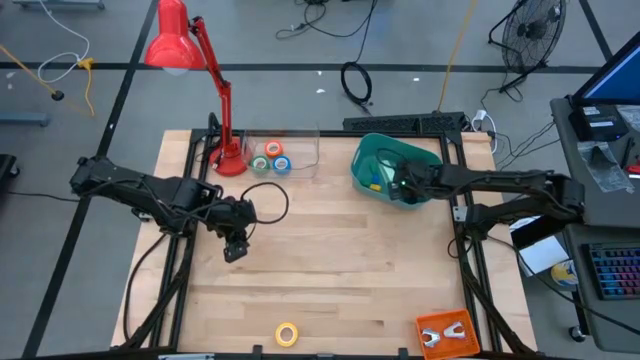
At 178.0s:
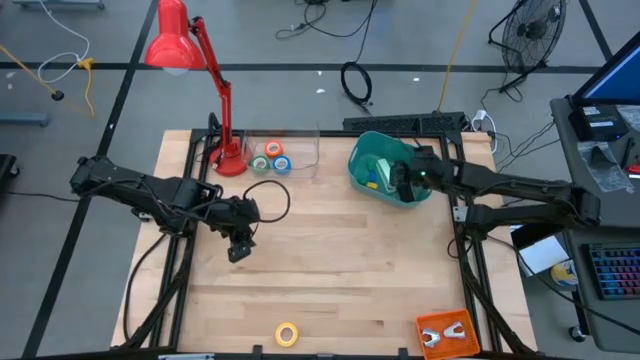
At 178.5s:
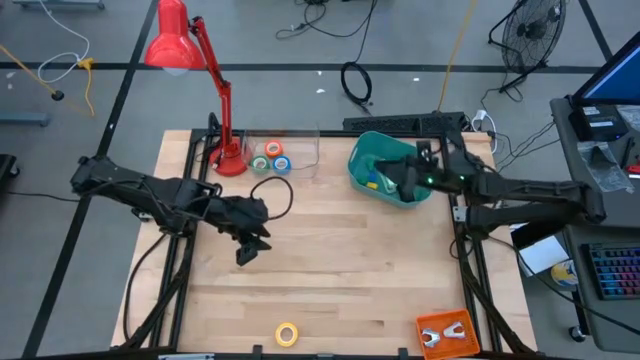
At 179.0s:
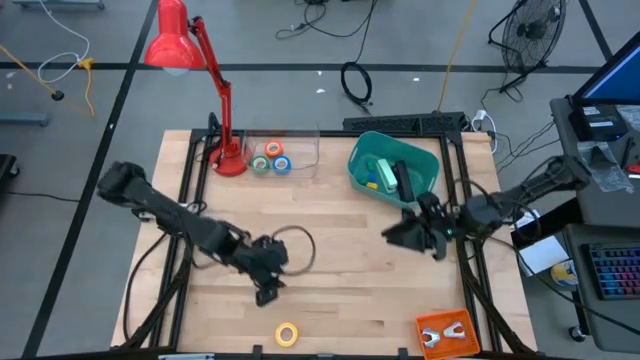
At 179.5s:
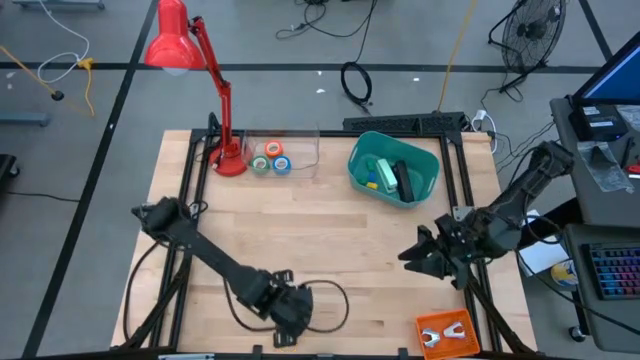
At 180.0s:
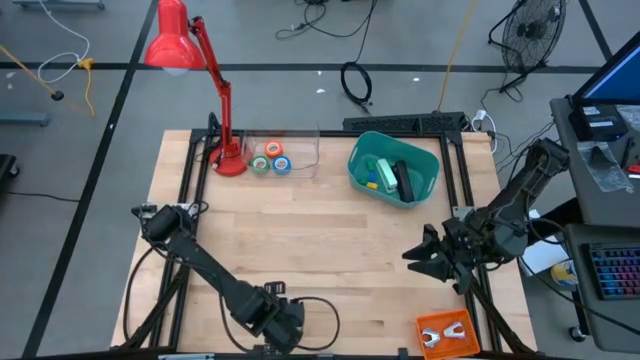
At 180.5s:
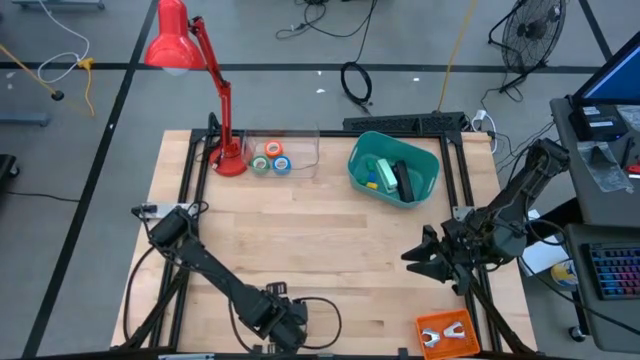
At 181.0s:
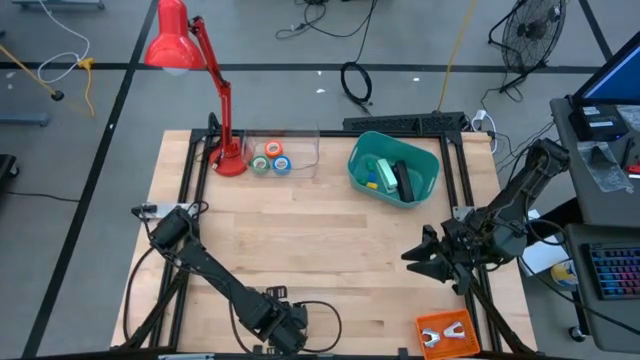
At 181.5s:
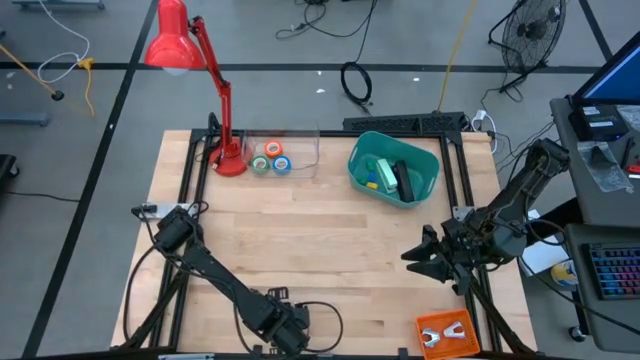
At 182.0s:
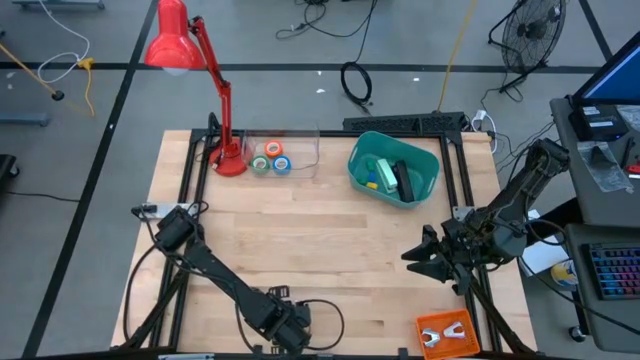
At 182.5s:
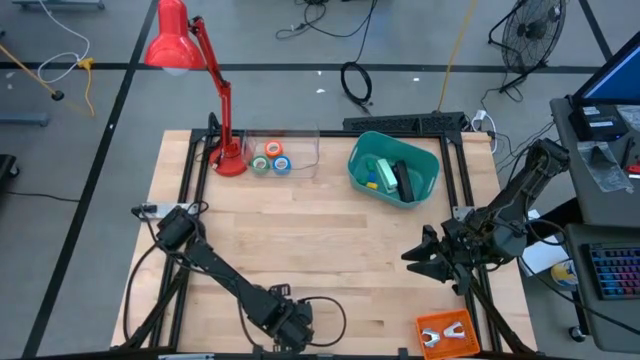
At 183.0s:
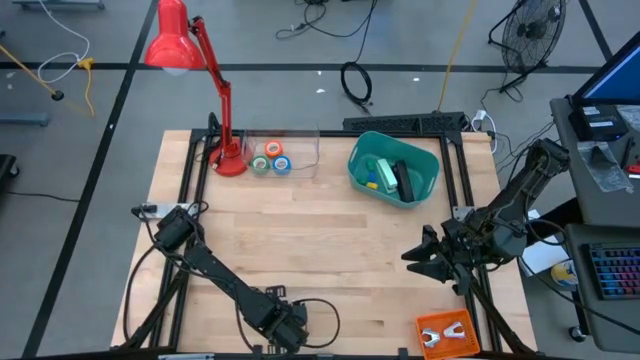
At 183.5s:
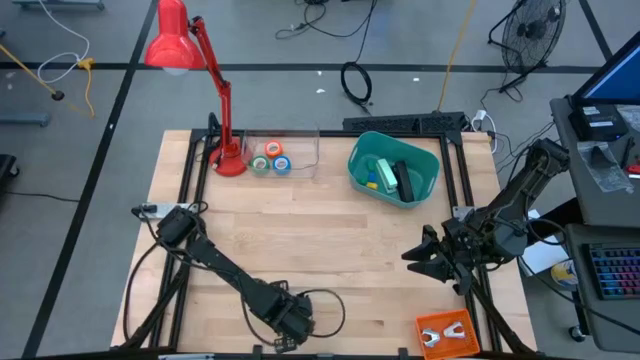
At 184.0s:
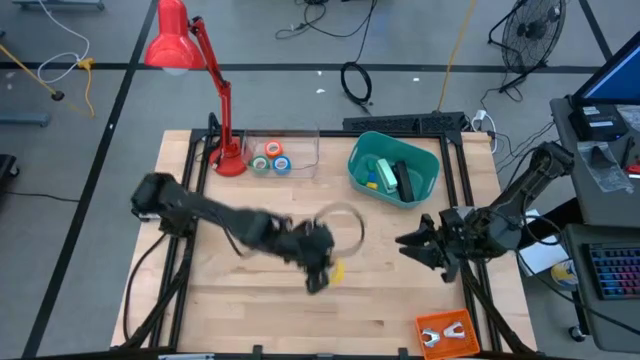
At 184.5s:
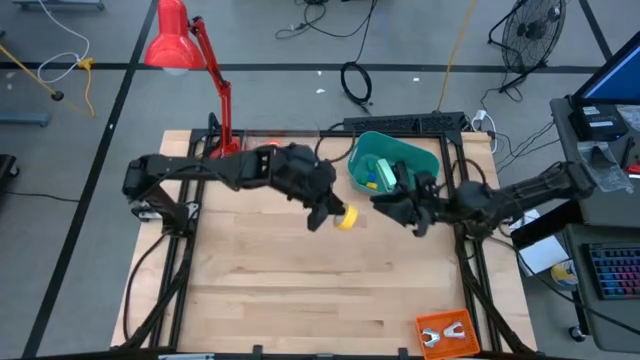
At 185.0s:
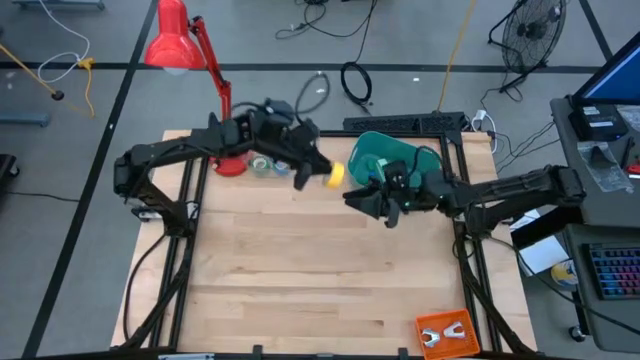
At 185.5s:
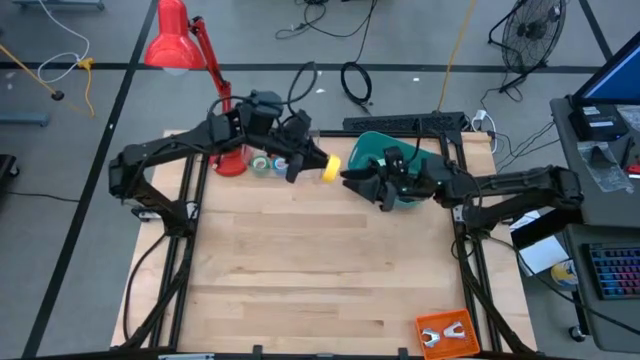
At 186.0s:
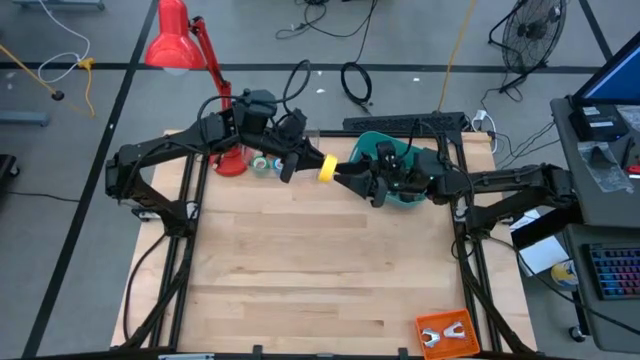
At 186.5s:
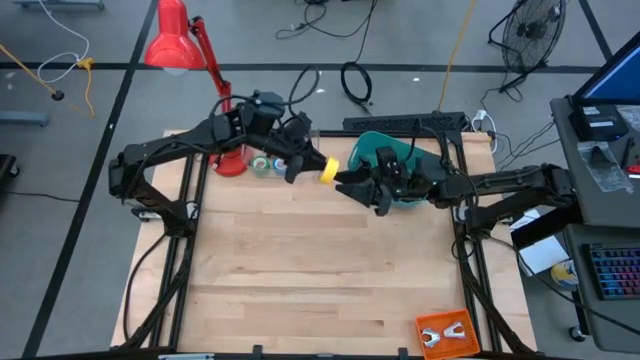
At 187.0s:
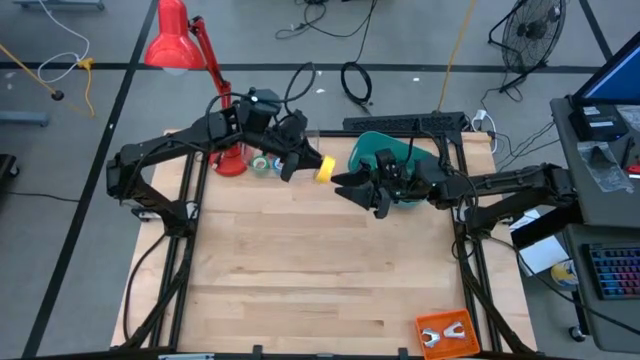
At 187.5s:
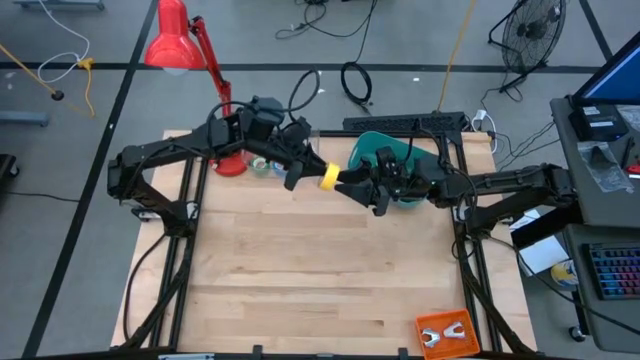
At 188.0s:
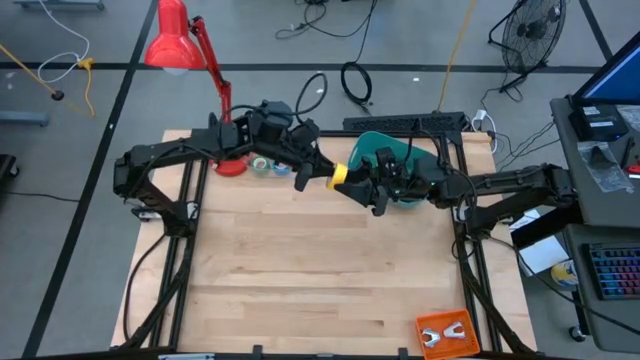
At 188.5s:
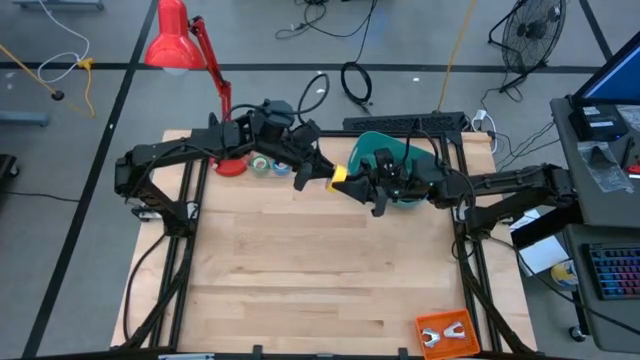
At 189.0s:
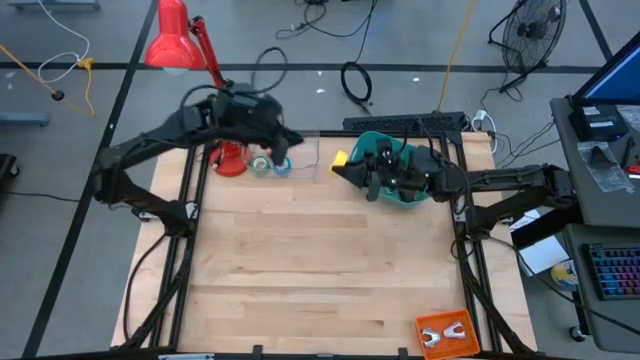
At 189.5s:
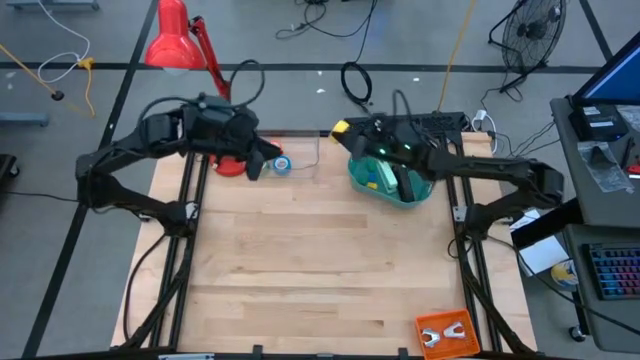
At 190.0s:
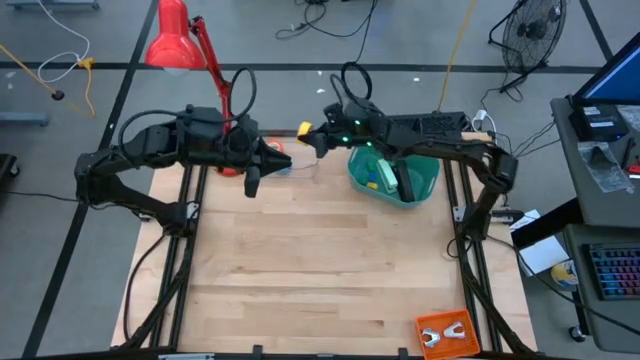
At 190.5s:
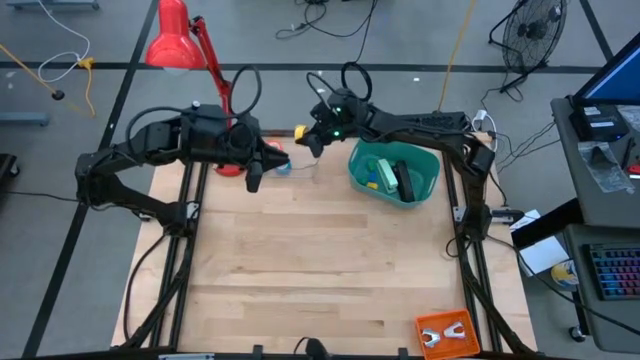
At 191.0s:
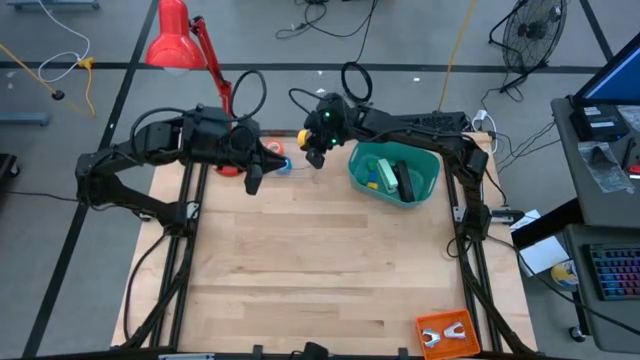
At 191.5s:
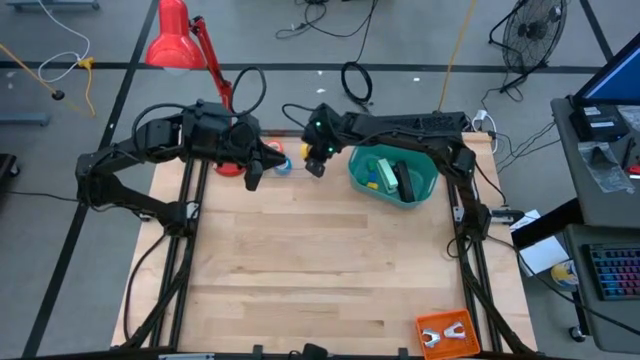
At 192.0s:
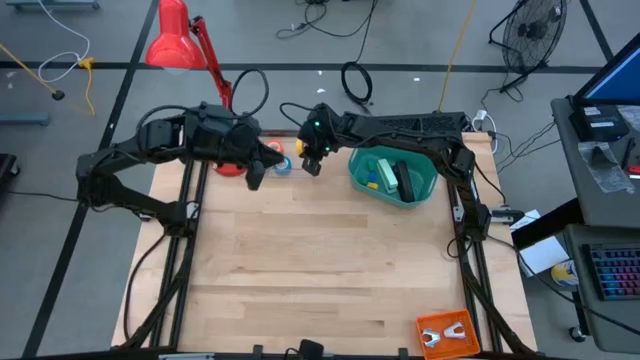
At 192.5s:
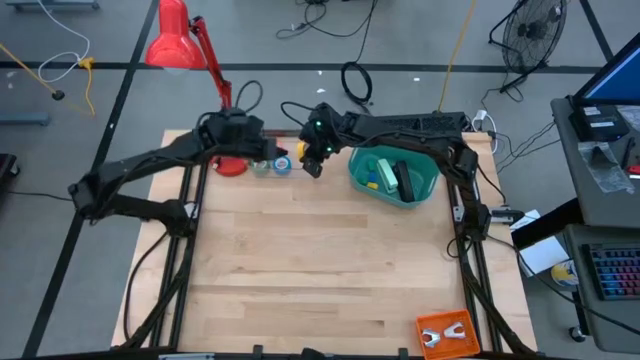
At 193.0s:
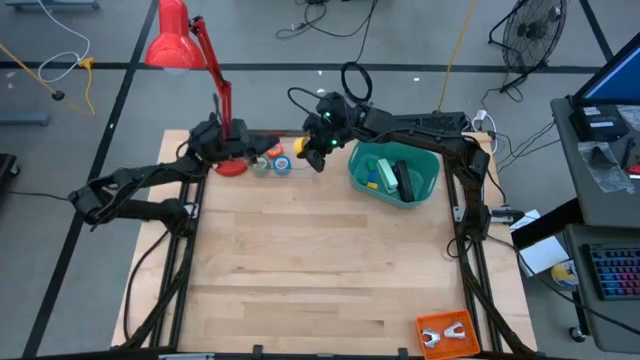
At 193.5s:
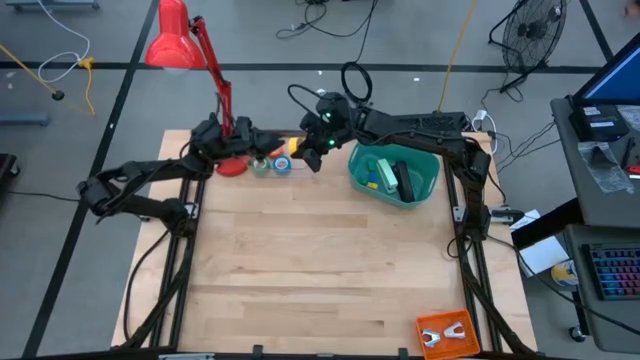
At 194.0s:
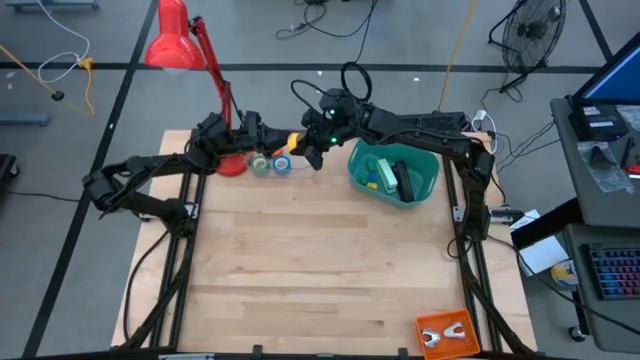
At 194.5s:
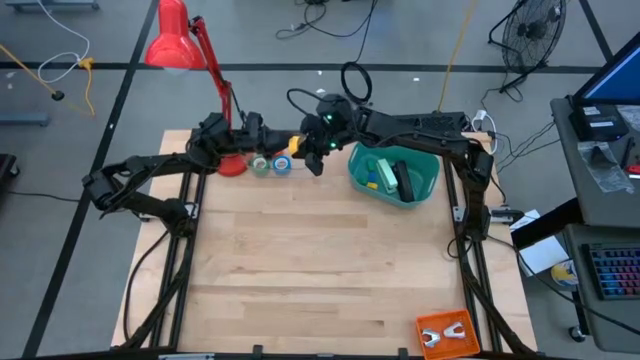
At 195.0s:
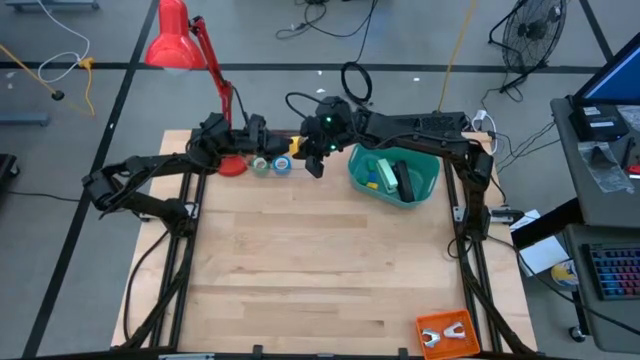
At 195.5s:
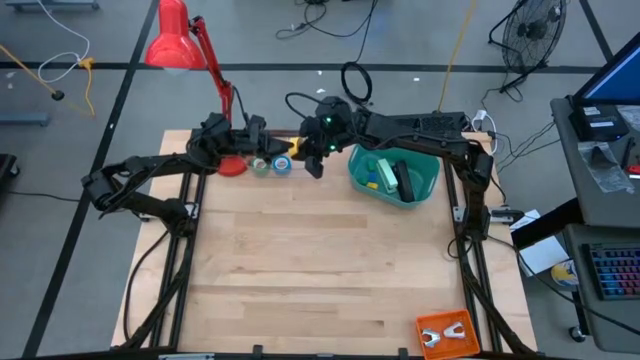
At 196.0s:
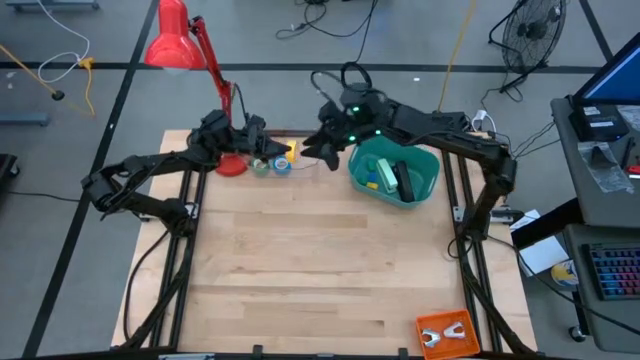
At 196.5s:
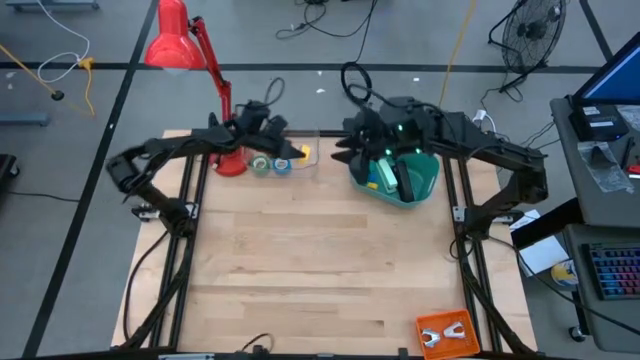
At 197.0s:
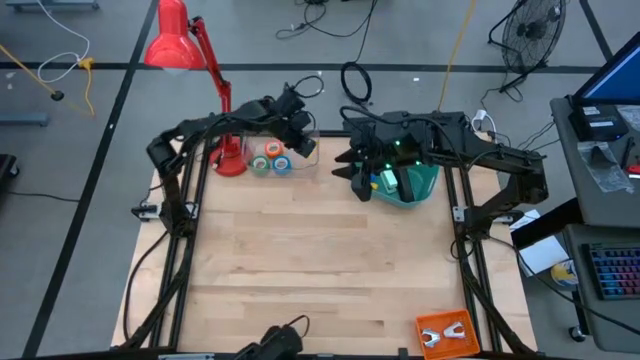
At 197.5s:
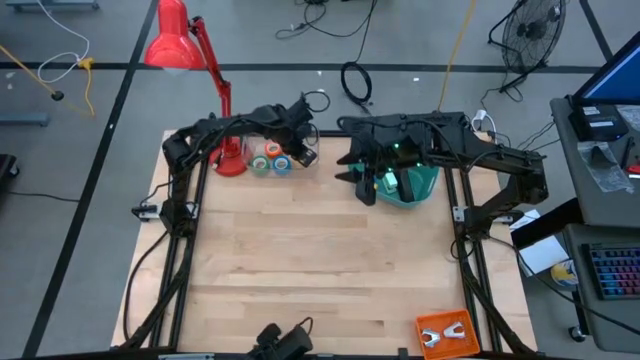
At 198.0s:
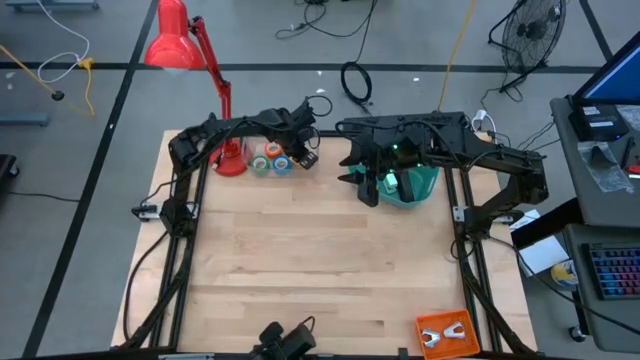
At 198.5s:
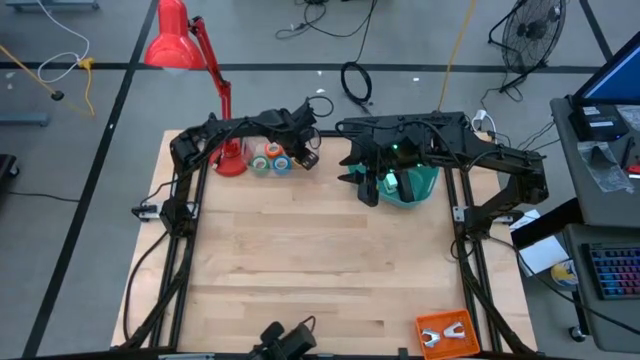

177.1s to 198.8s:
Task: Pick and place Stapler, Stapler remover, tape
Put the yellow tape into the transparent bin
